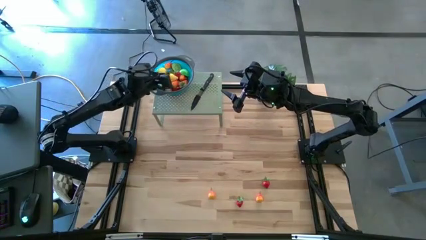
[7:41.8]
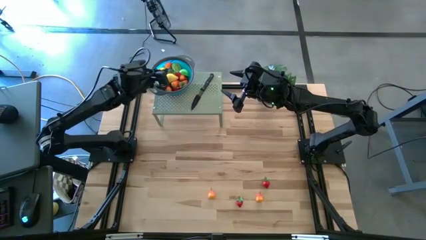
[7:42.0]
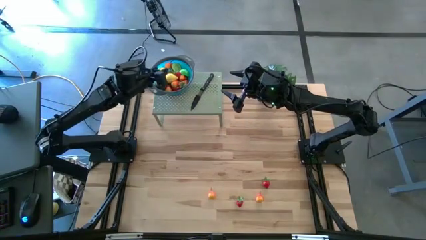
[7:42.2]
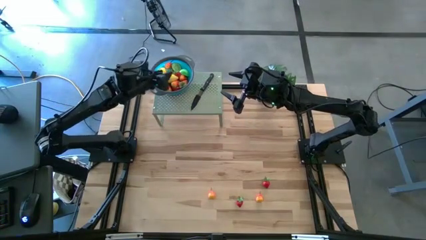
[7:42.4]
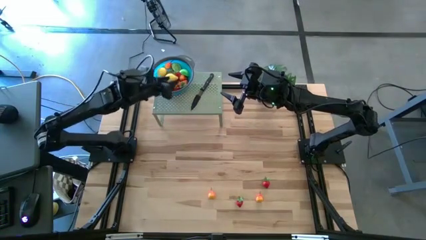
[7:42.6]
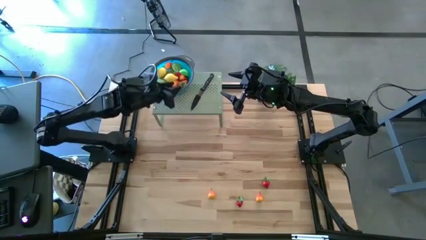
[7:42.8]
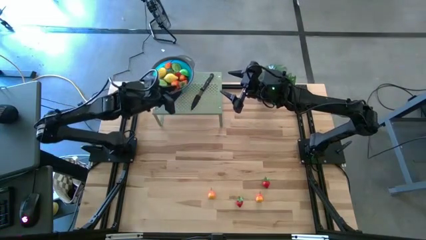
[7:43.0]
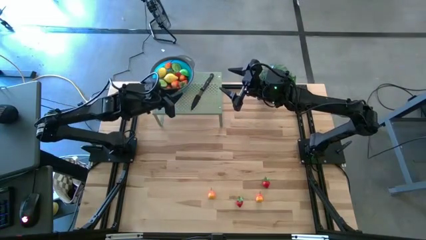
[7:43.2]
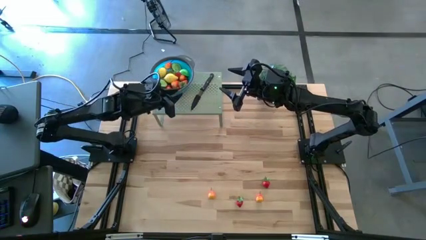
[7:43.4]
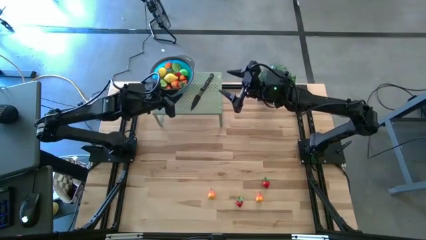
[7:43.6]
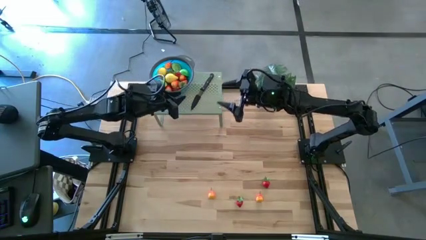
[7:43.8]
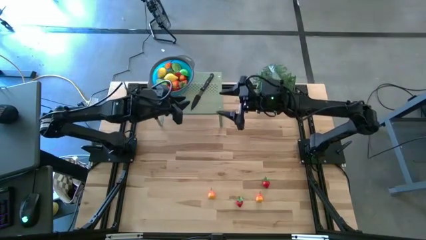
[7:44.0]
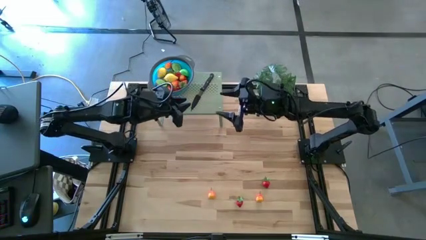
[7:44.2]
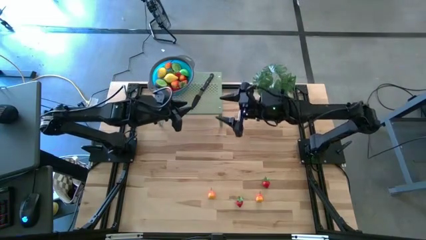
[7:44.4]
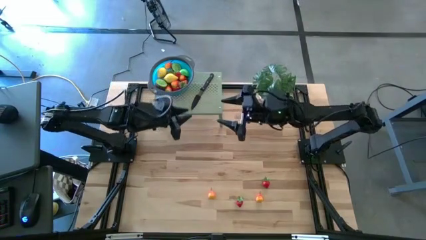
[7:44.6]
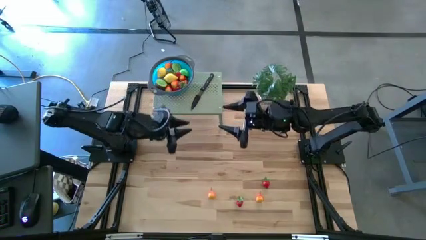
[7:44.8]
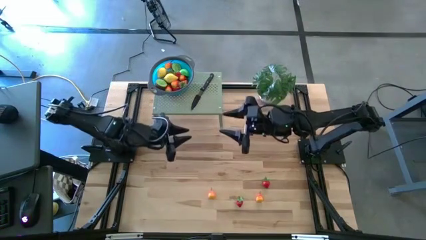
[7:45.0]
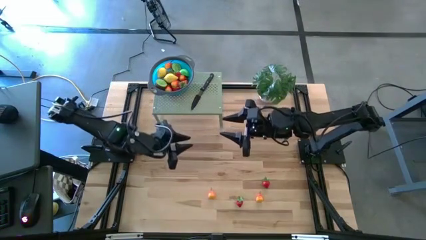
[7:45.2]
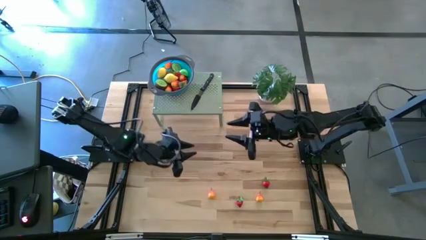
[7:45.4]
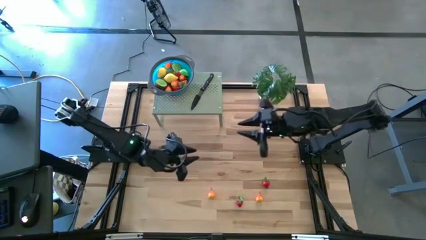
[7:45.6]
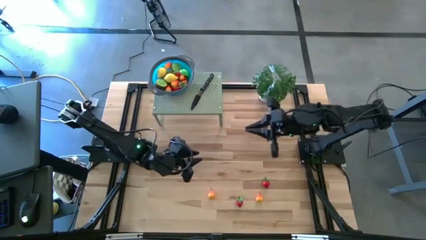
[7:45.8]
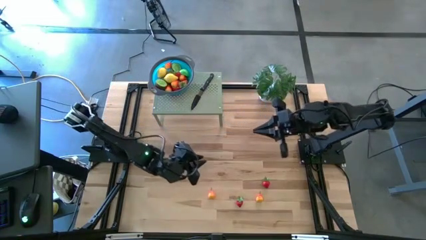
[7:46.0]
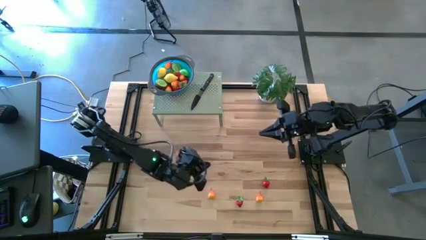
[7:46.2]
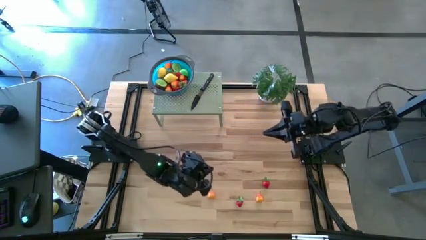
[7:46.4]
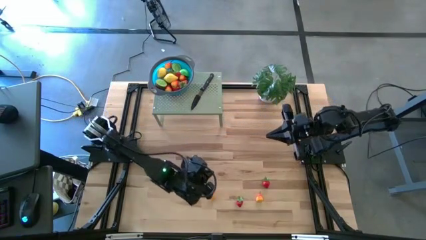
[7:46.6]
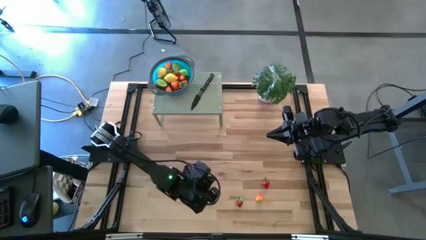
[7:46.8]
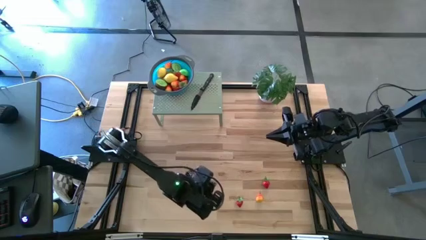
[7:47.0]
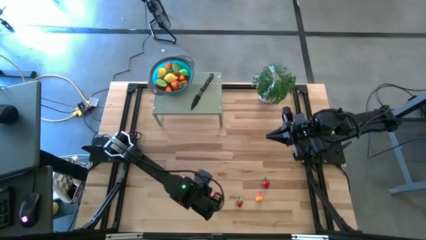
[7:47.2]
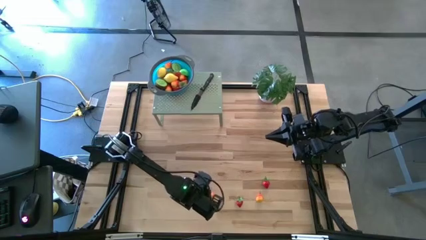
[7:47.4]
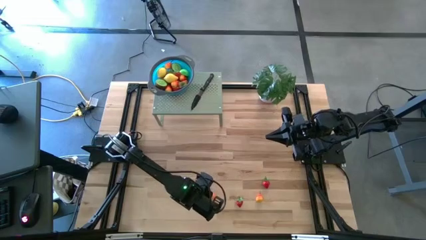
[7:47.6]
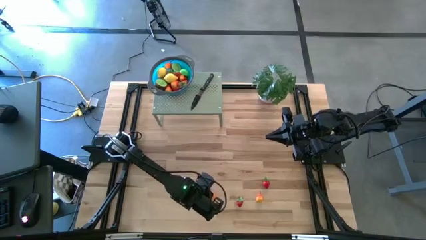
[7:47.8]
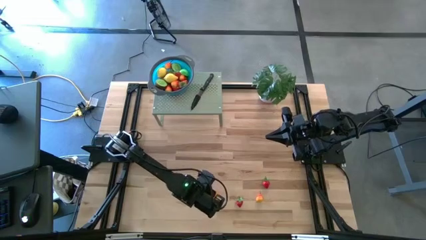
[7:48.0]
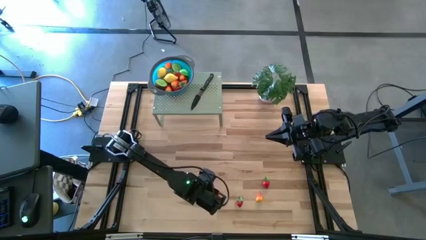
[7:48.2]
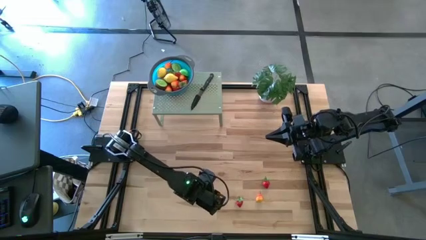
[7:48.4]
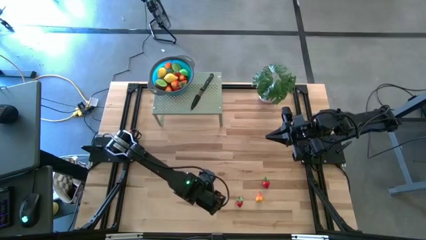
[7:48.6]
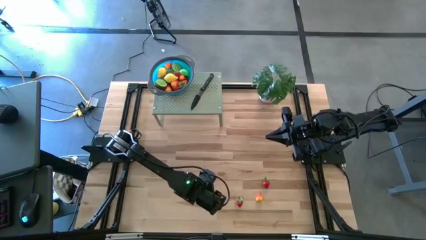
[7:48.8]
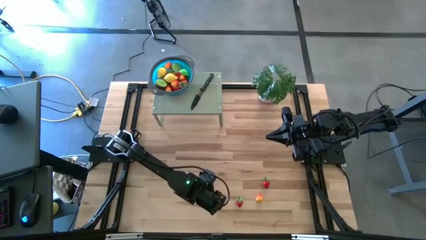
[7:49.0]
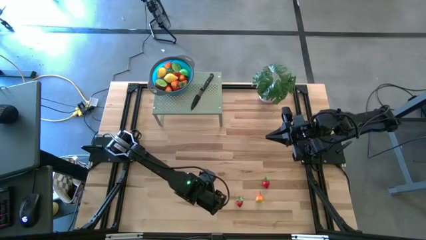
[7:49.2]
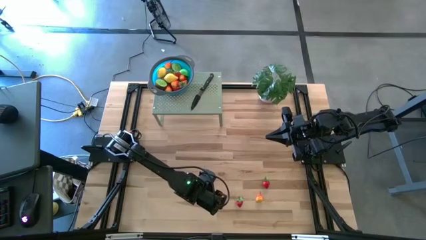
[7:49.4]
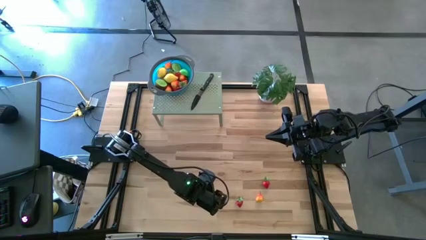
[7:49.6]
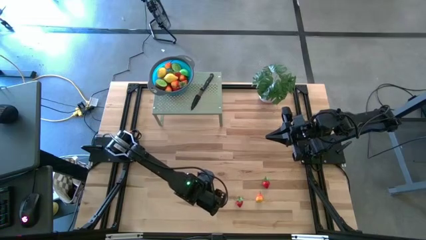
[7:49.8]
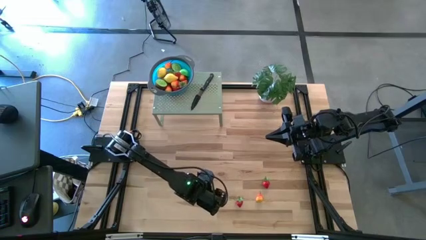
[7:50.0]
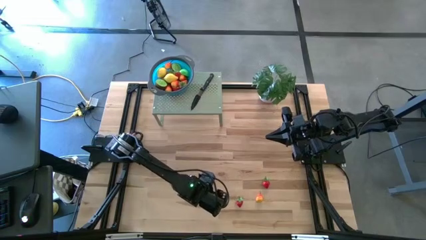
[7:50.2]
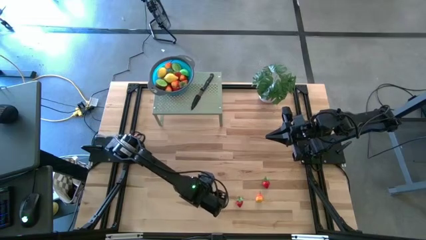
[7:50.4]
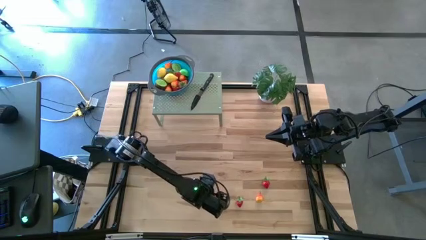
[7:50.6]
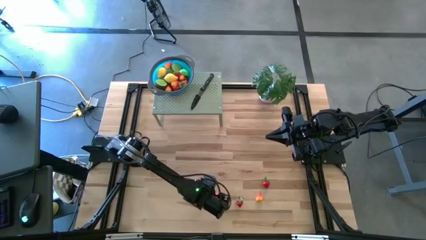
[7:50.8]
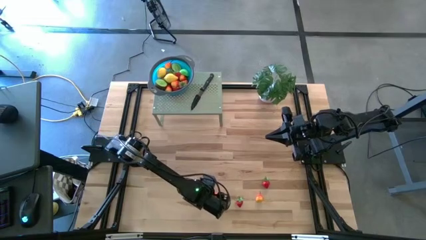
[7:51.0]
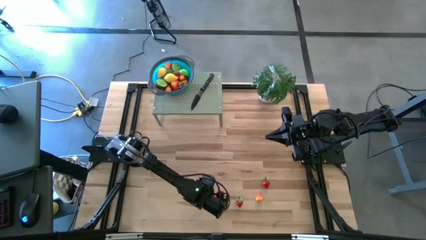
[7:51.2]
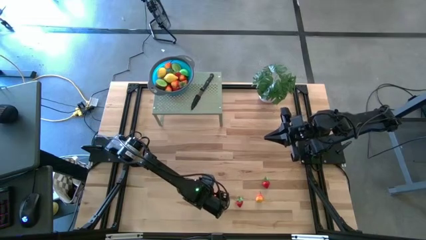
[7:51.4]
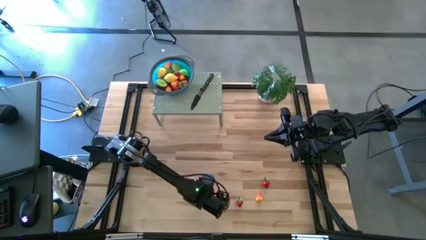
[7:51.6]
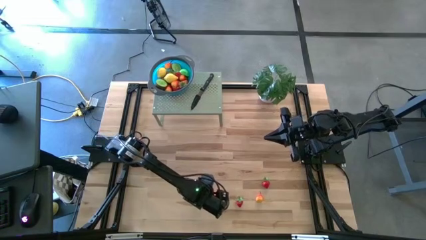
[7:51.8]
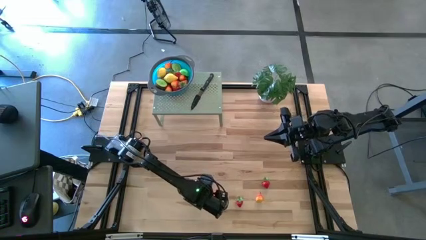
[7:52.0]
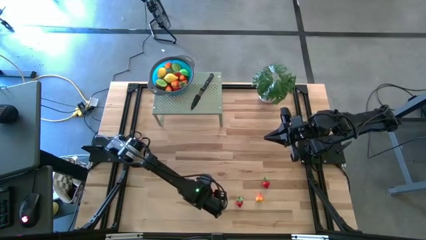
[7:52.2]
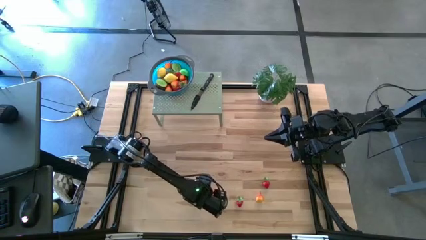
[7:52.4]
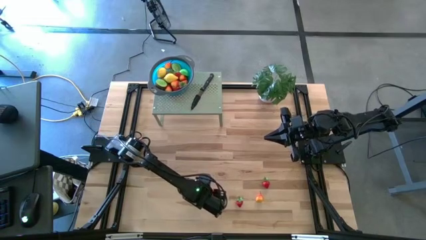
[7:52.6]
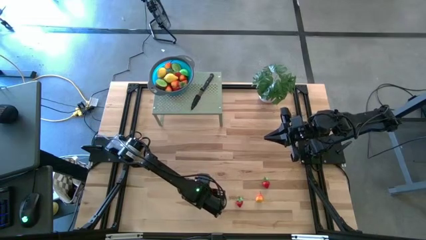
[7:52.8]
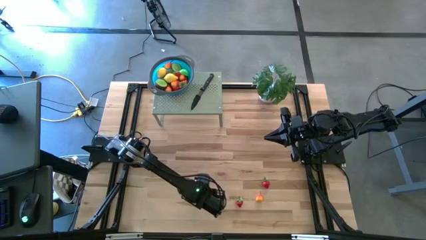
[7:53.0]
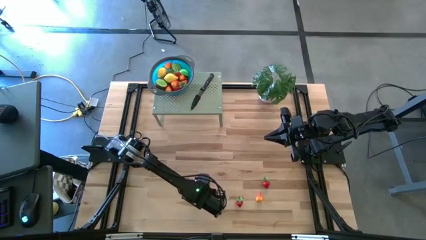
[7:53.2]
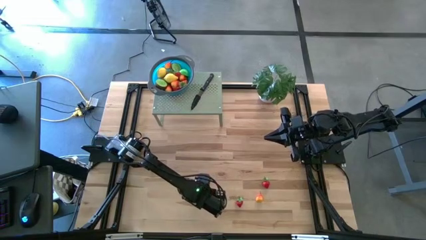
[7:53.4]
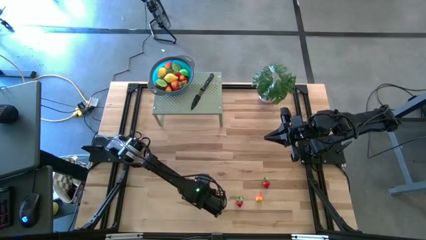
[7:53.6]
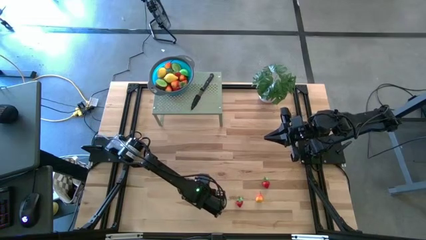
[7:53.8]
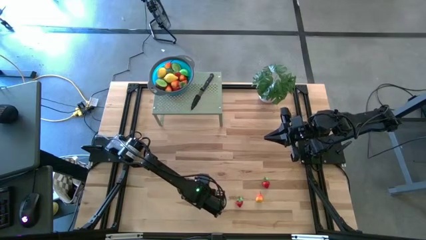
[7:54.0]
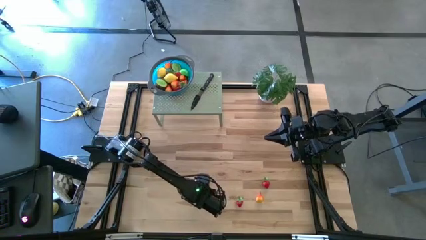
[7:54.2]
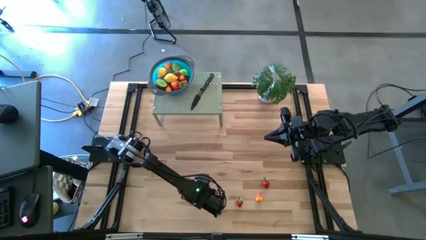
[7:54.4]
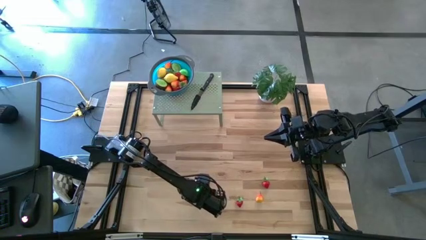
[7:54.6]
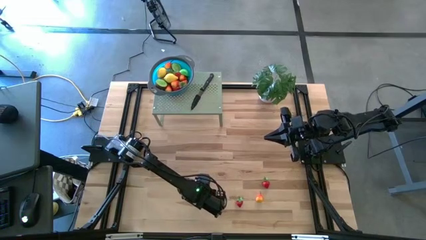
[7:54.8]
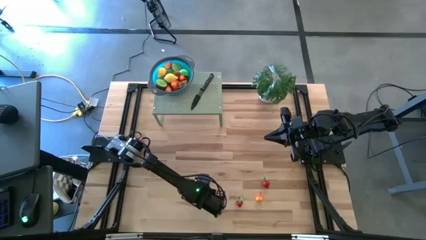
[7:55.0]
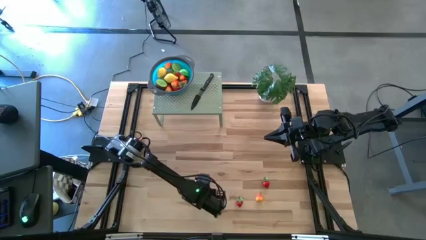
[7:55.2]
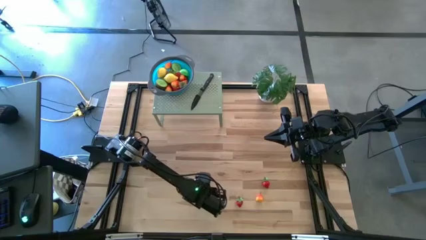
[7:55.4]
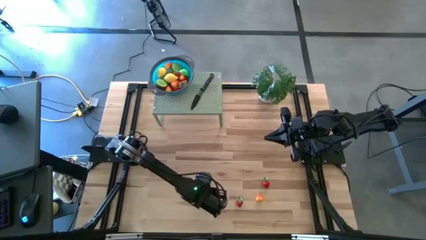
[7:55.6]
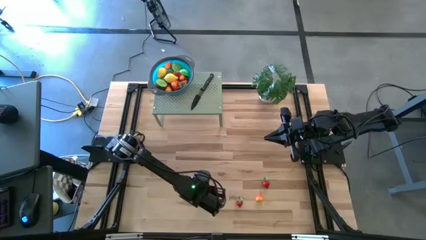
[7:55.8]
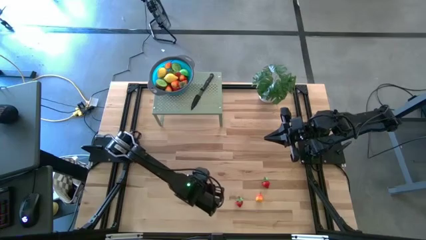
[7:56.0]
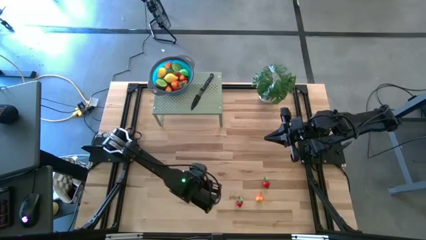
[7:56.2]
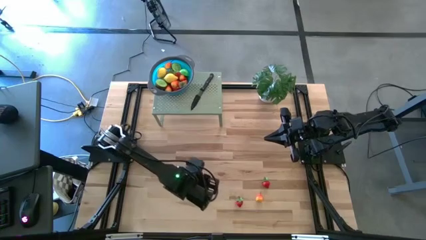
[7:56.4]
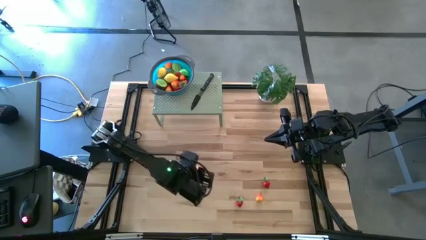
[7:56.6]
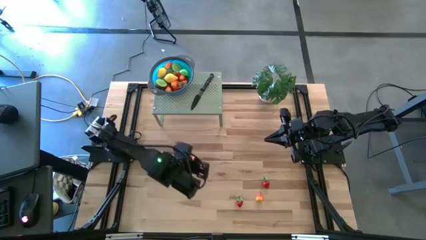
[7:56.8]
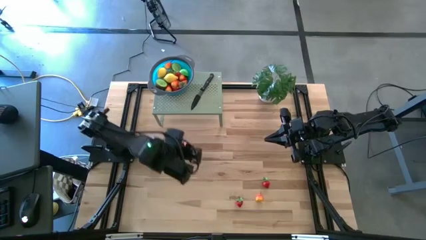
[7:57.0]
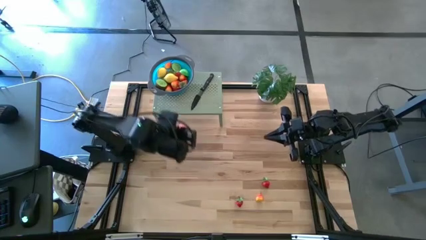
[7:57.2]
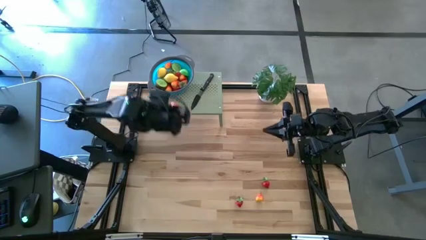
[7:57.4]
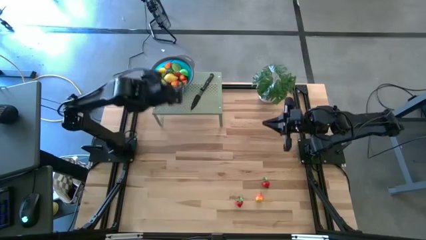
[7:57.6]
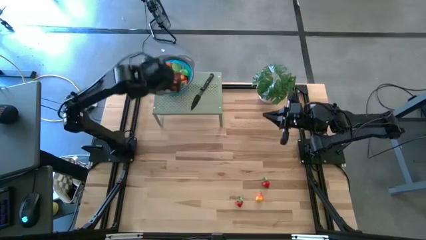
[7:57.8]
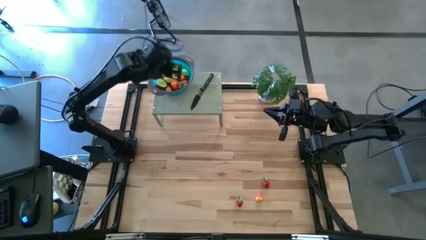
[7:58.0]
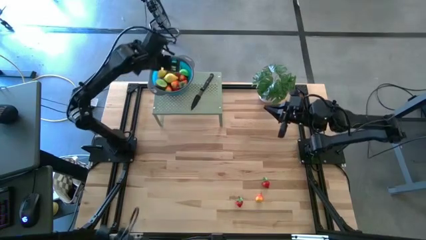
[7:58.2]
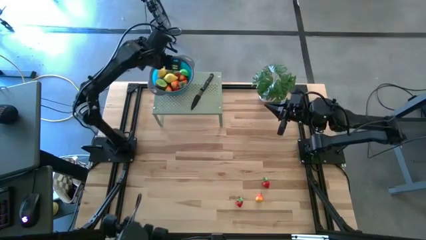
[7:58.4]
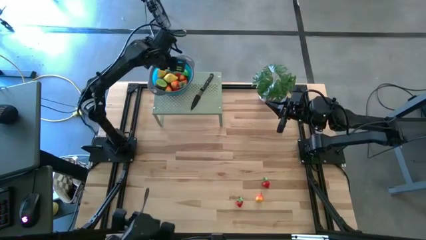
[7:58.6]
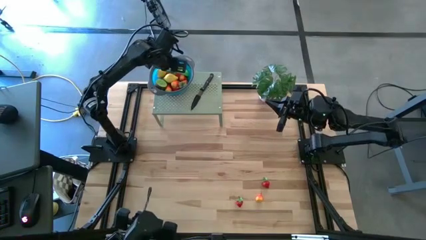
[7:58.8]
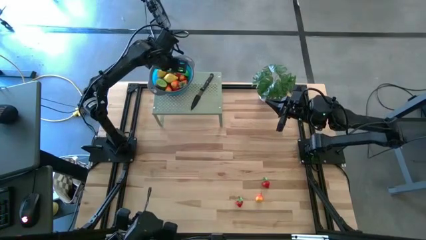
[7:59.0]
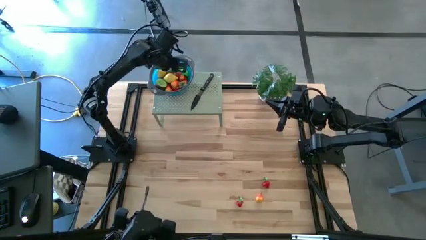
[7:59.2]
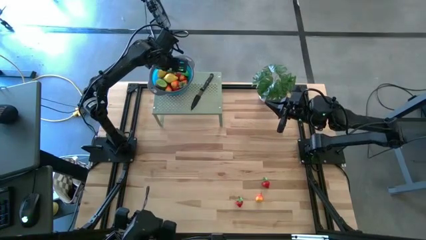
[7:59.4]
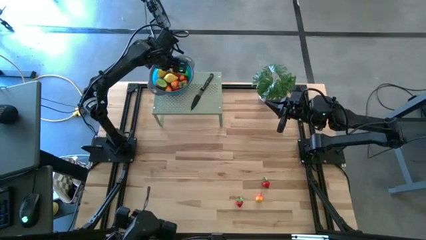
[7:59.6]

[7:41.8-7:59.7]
Task: Pick & Place Fruit
Put the orange pear into the strainer bowl on the shelf
